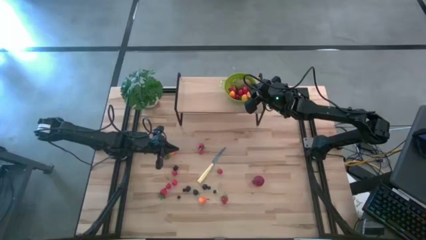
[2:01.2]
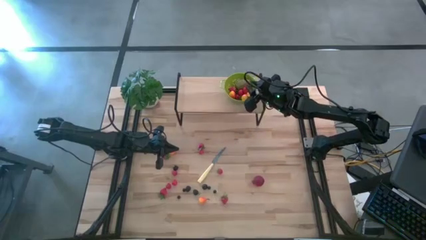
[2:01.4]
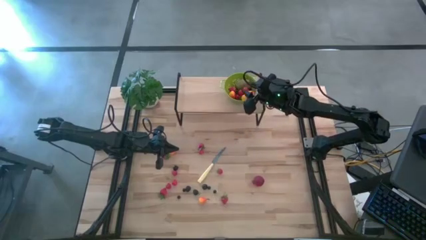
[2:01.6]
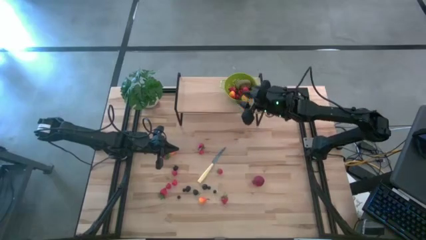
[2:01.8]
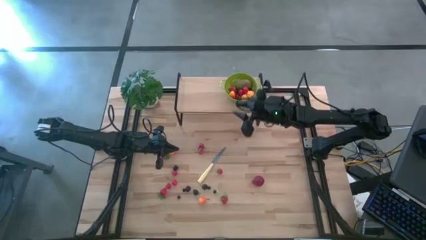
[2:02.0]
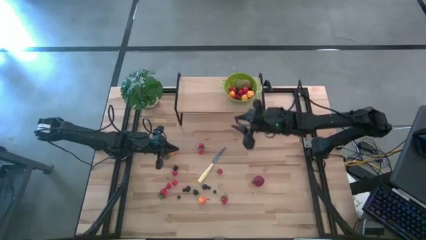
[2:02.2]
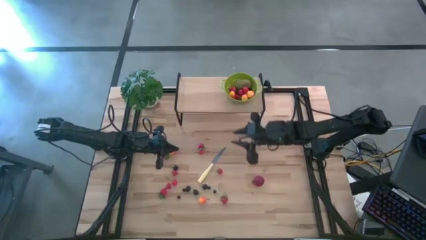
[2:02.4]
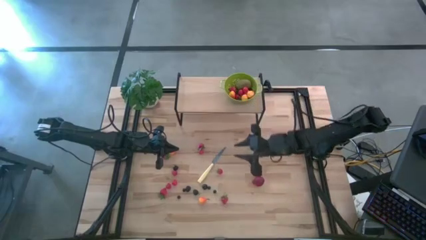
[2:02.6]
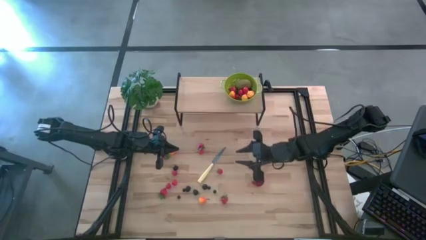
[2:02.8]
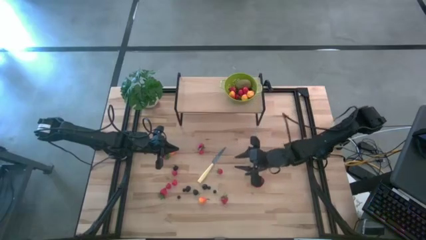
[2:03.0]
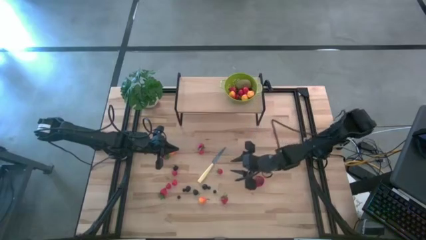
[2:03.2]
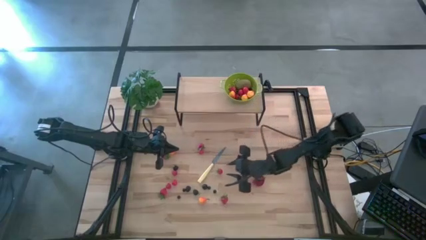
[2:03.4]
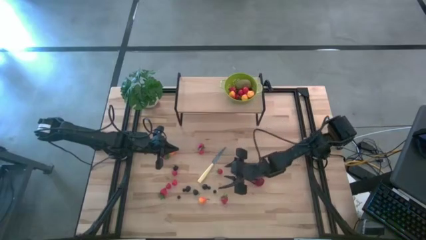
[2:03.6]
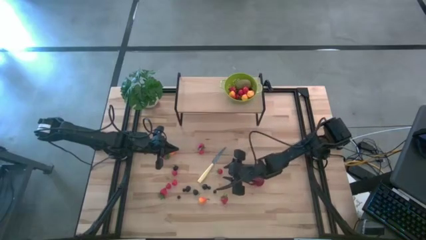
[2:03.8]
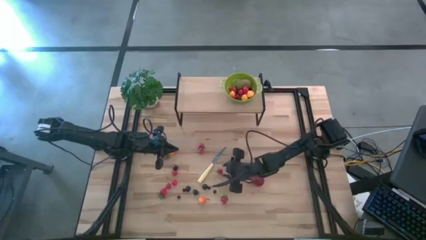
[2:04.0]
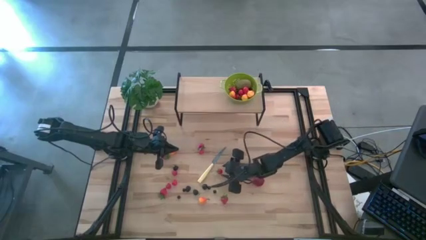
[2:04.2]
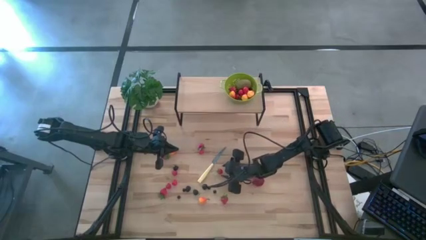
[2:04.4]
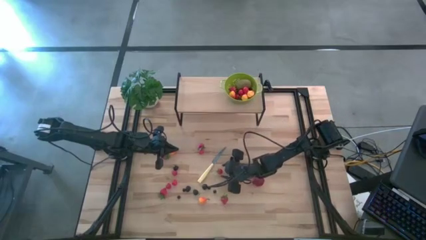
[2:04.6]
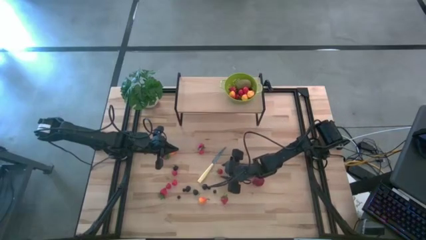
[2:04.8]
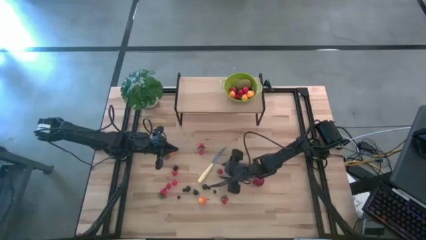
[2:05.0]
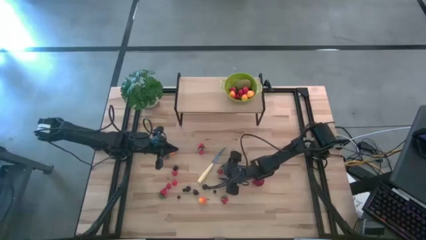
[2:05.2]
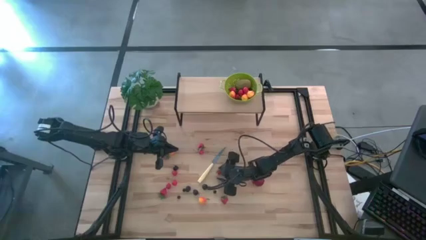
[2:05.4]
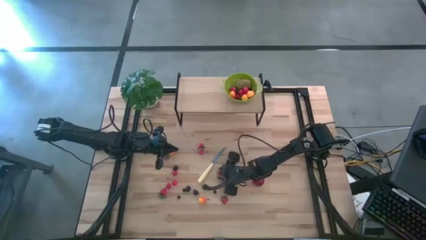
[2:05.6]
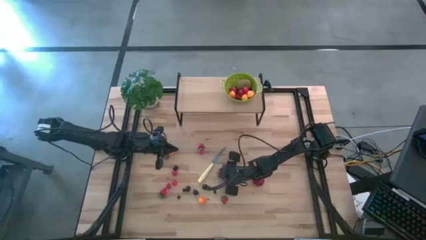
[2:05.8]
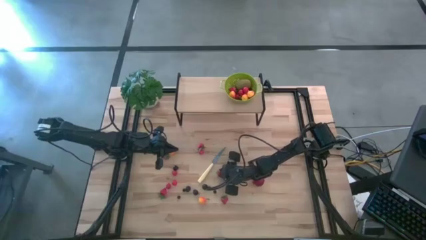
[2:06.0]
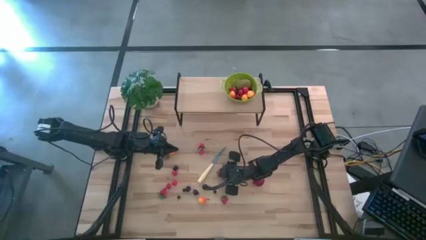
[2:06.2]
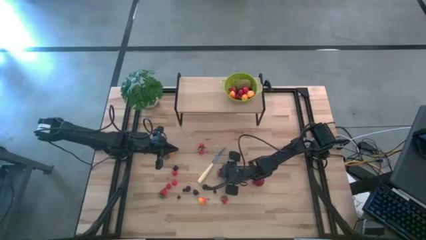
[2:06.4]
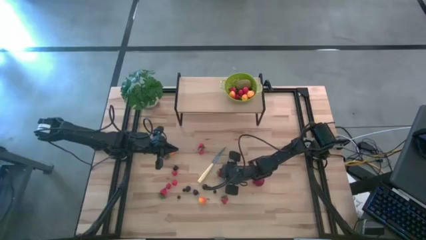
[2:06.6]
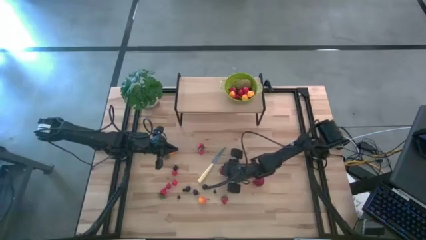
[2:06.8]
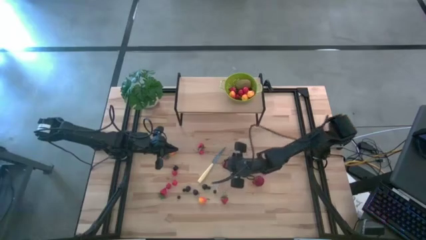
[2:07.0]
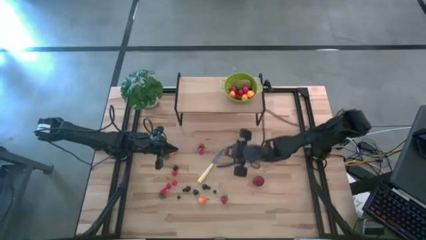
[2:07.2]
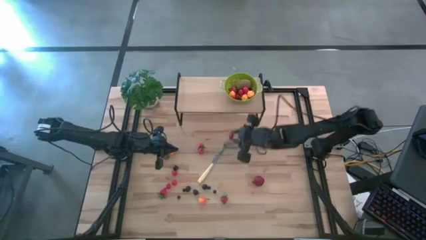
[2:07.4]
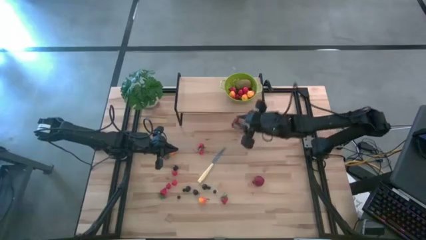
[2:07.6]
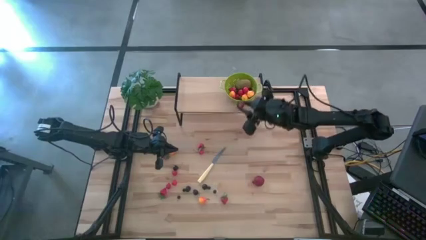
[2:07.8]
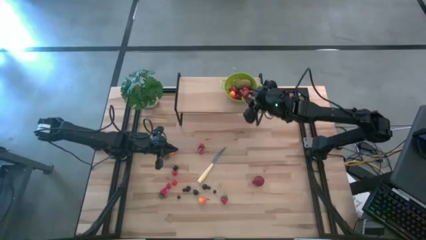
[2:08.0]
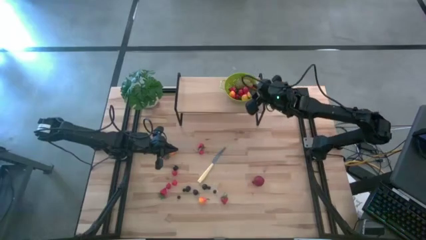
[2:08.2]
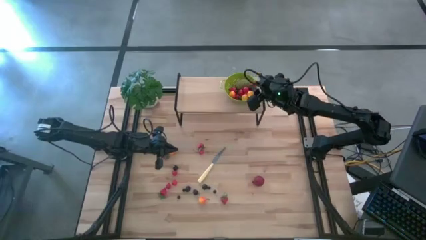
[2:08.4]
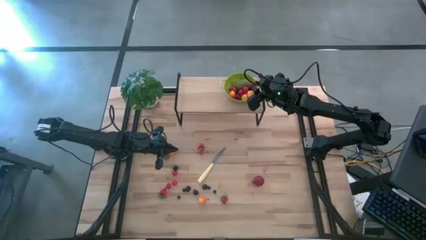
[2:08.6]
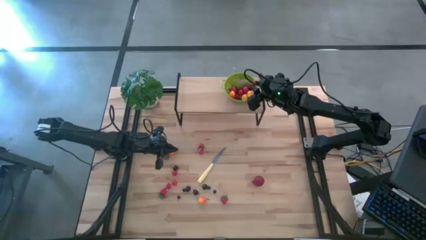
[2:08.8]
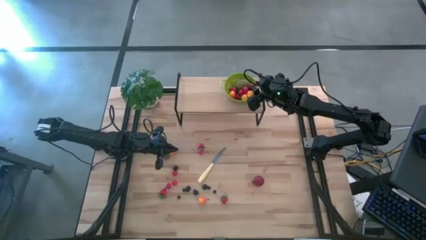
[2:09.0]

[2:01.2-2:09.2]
Task: Pick & Place Fruit
Put the strawberry into the strainer bowl

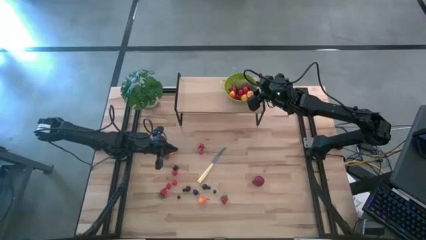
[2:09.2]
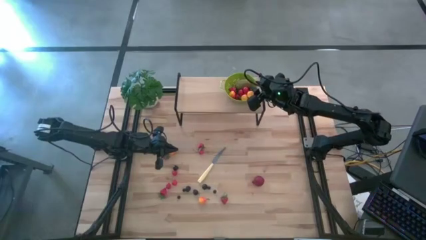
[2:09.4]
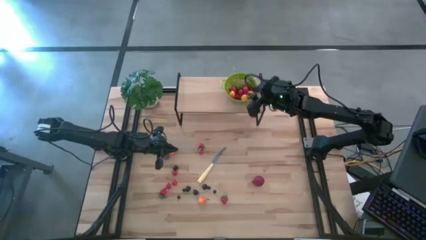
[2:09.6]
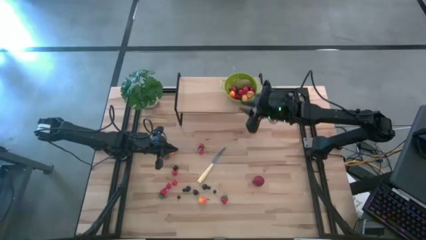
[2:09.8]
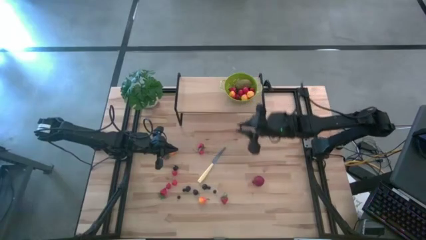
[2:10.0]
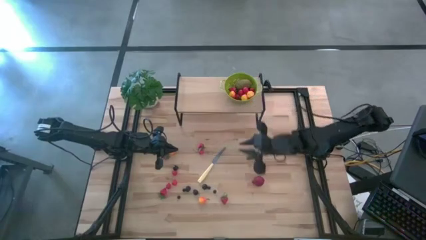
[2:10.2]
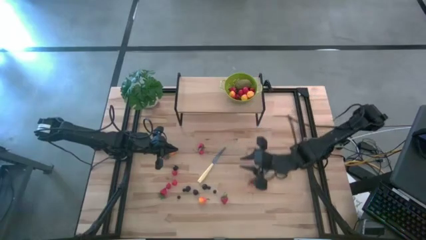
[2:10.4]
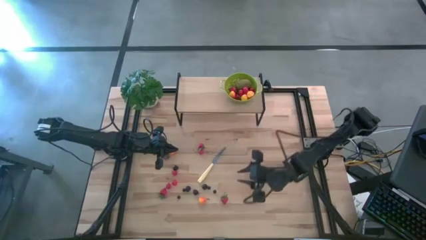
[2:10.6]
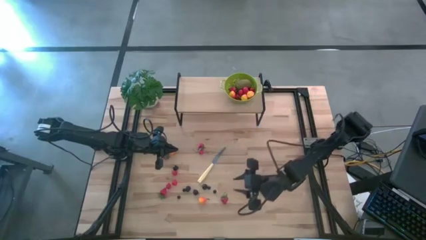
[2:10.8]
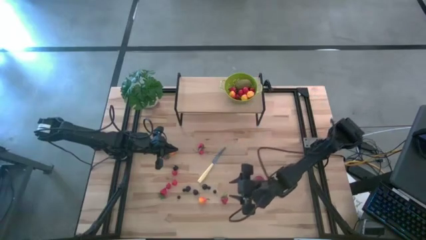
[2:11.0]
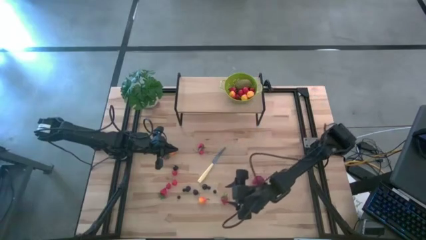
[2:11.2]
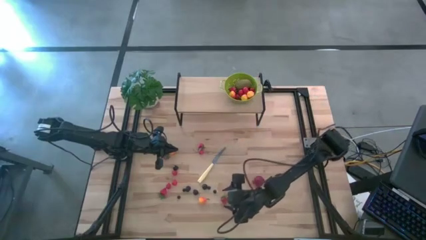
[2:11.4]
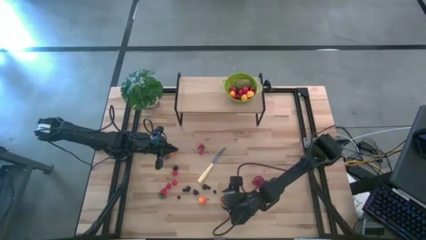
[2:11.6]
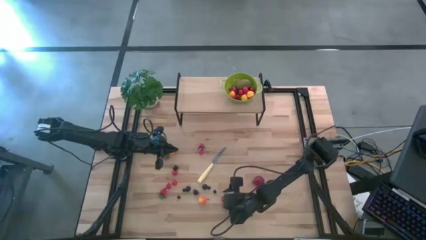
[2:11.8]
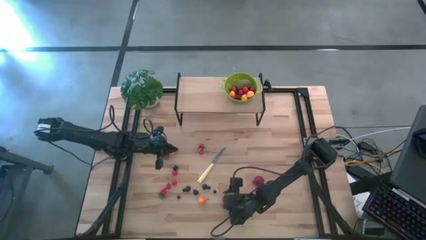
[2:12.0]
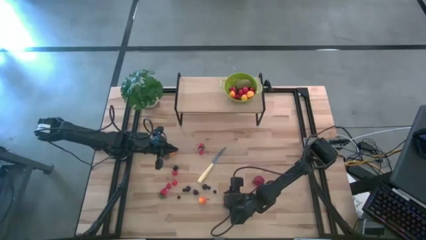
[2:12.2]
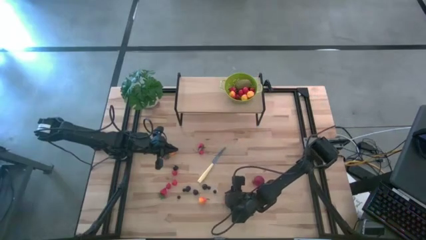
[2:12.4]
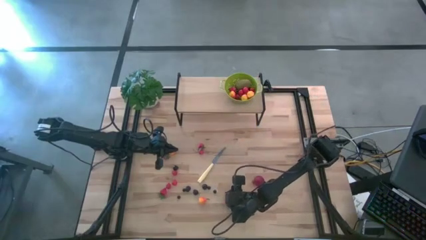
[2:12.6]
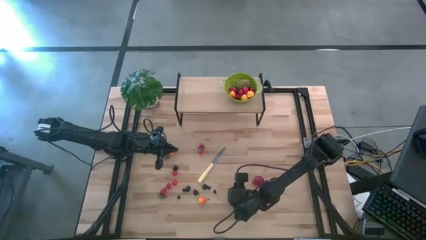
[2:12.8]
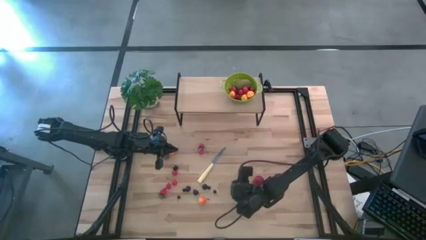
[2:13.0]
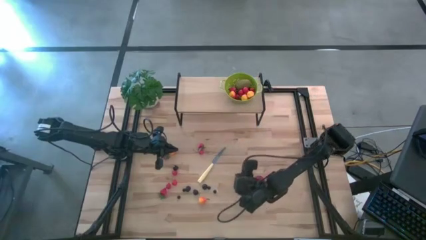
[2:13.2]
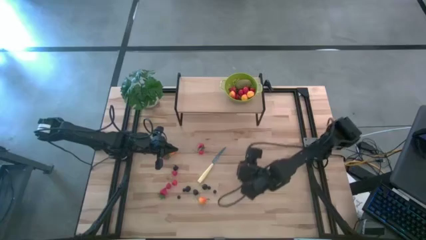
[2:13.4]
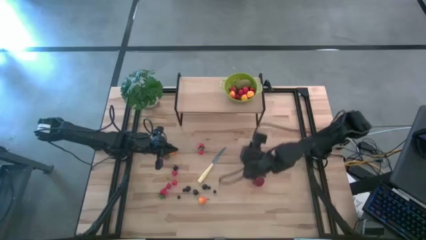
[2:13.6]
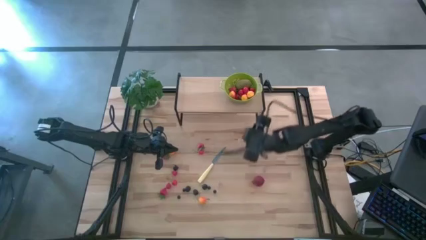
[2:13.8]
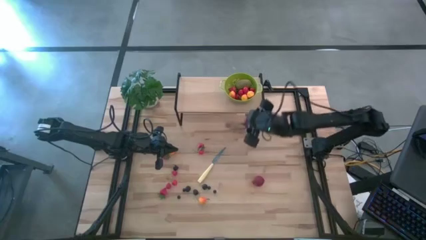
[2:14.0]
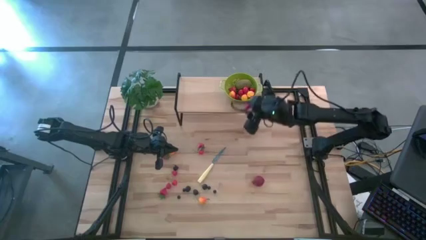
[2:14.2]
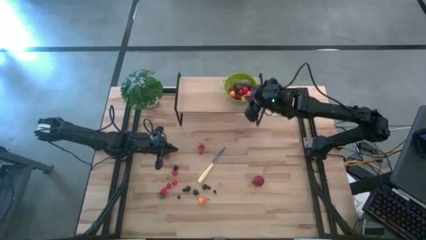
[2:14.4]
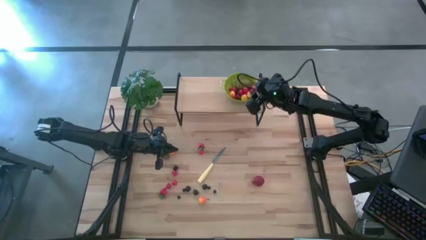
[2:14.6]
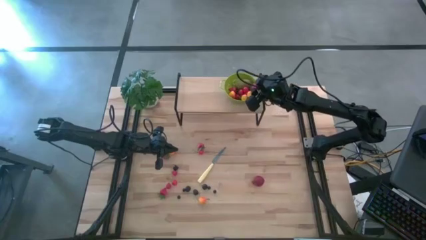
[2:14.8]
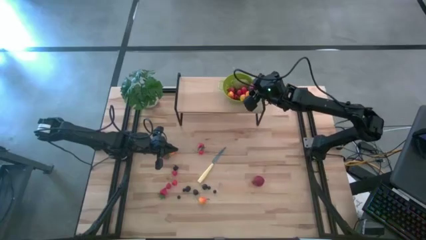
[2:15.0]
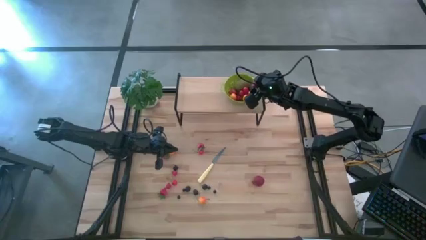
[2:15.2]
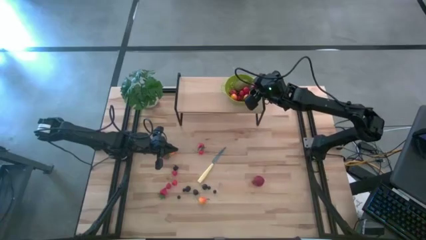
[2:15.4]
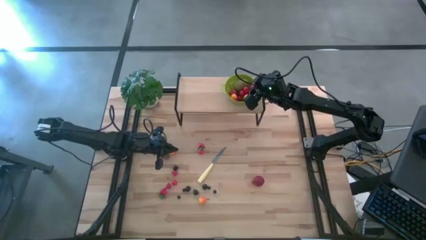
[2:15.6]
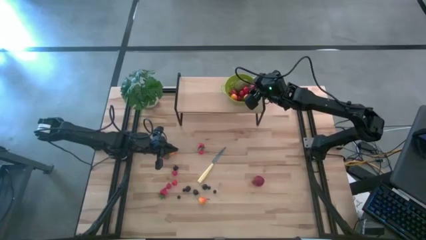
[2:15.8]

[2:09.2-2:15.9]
Put the strawberry into the strainer bowl

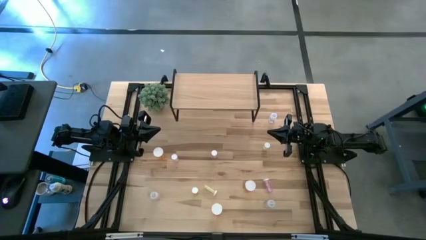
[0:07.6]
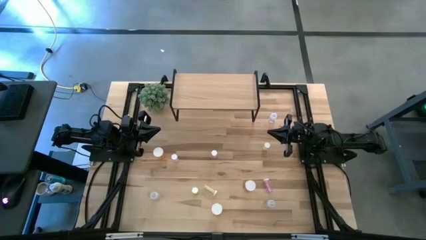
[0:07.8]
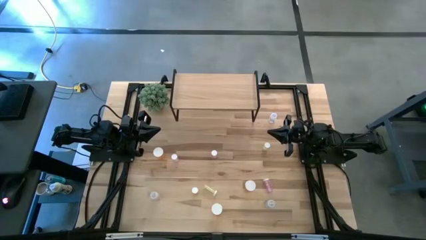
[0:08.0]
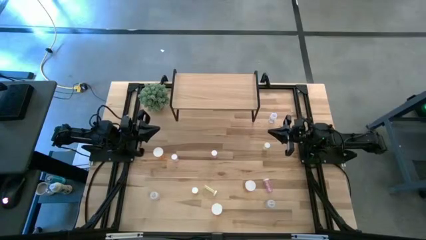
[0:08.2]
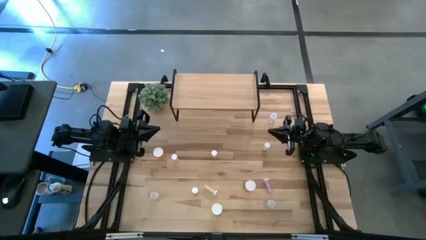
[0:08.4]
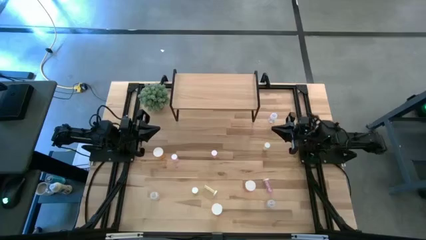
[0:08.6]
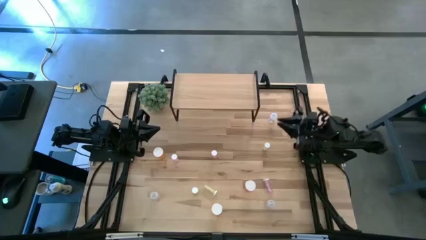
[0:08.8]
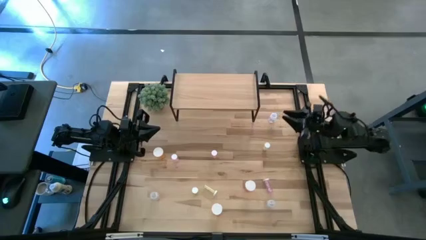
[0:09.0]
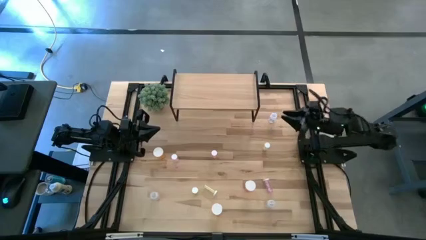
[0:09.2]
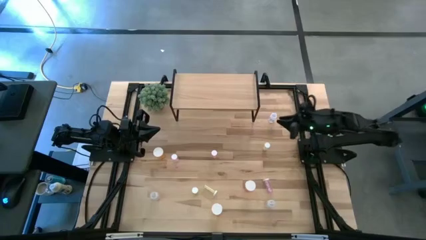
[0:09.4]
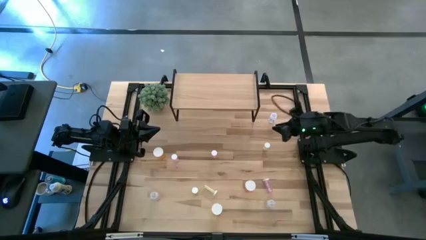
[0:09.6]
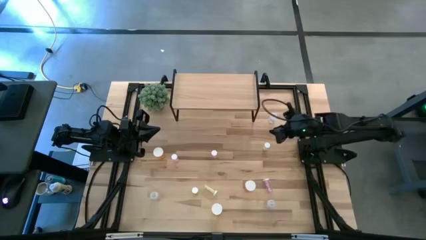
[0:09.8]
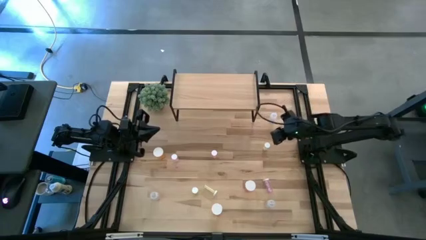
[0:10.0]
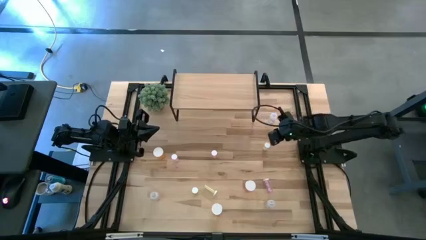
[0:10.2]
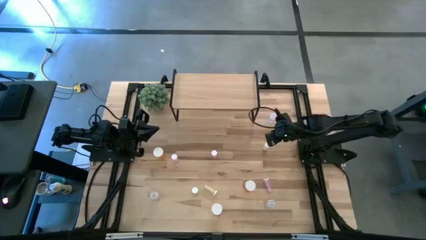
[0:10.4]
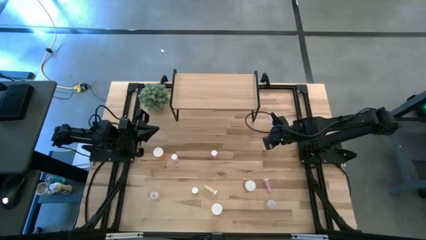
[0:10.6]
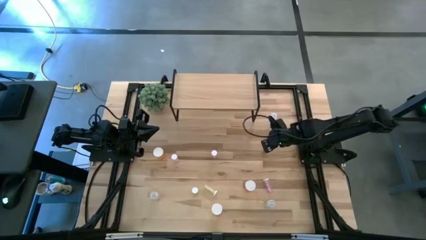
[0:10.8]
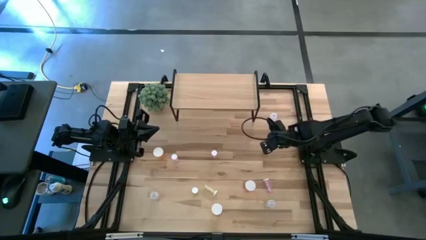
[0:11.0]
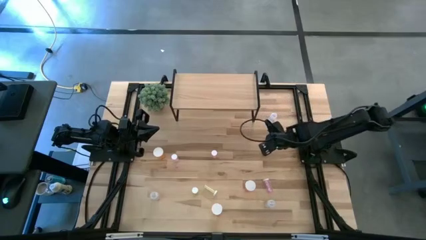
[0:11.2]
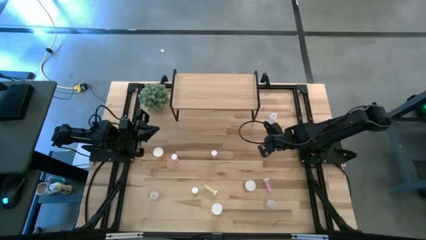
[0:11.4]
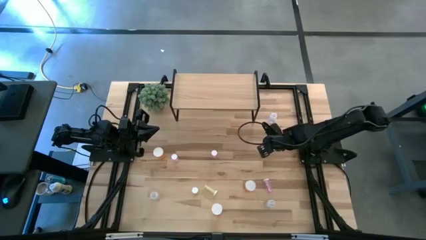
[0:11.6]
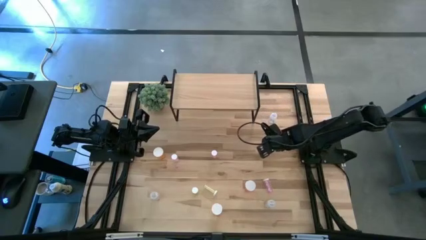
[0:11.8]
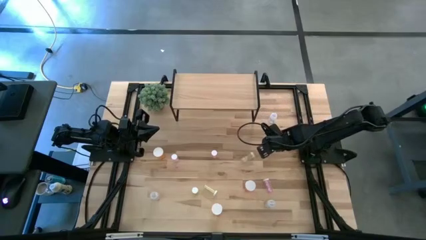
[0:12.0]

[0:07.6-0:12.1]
Task: Pick and place medicine bottles onto shelf by color
Put the top yellow pill bottle on the shelf
